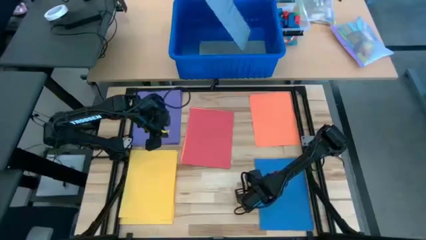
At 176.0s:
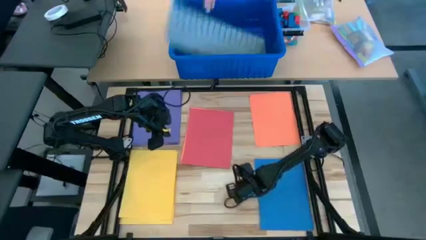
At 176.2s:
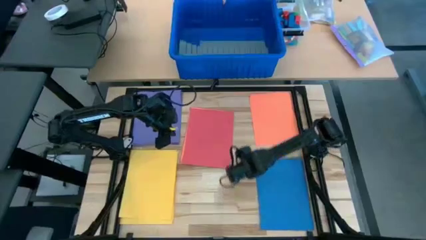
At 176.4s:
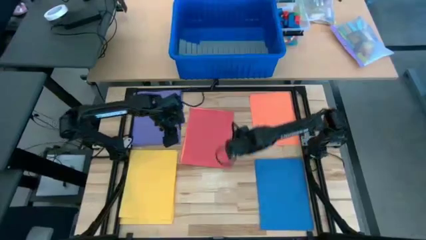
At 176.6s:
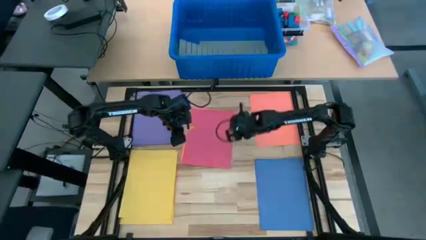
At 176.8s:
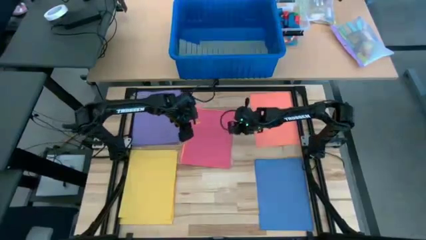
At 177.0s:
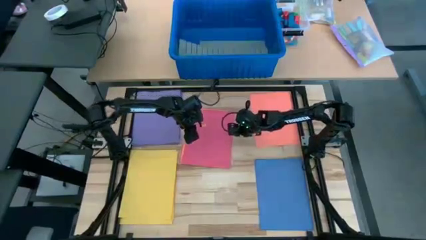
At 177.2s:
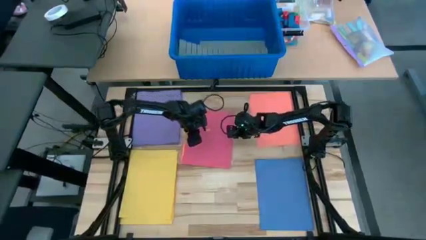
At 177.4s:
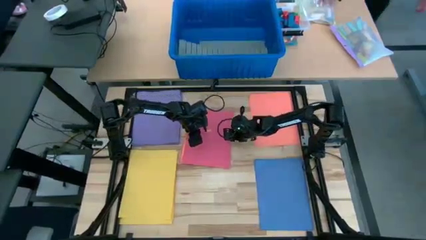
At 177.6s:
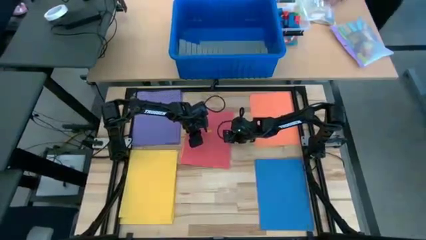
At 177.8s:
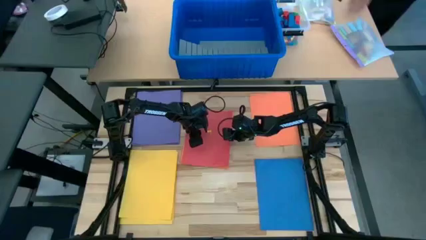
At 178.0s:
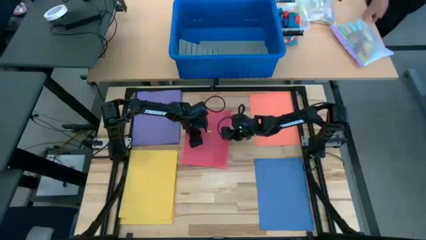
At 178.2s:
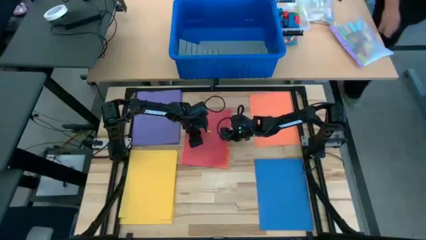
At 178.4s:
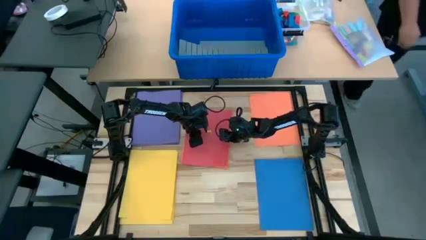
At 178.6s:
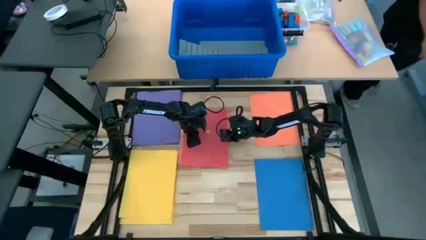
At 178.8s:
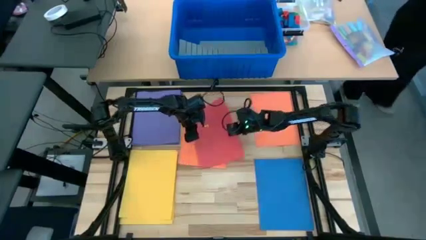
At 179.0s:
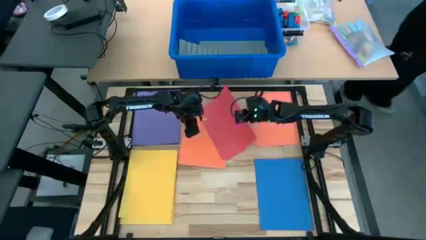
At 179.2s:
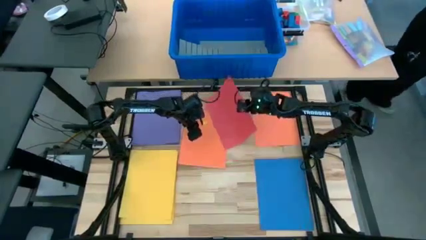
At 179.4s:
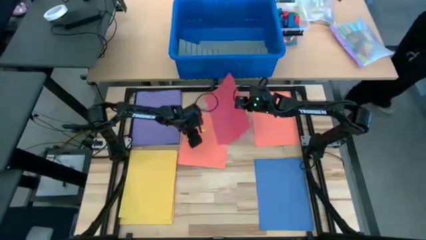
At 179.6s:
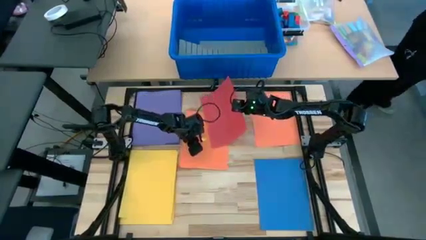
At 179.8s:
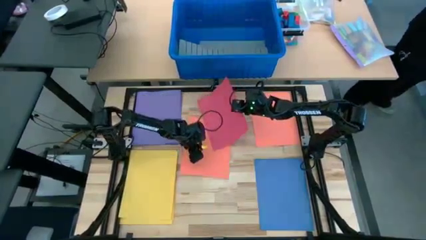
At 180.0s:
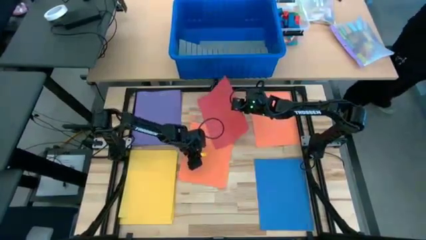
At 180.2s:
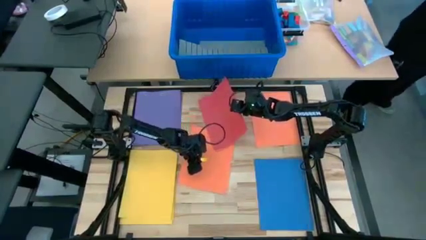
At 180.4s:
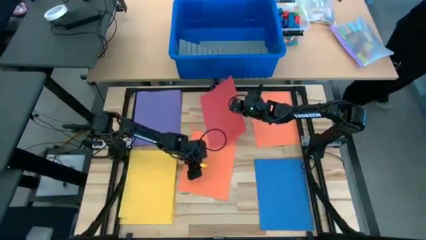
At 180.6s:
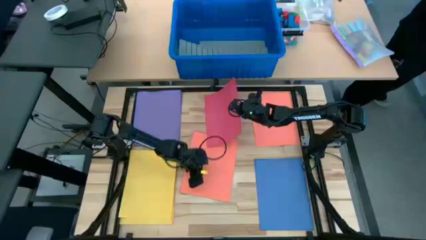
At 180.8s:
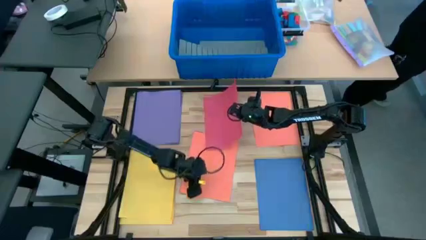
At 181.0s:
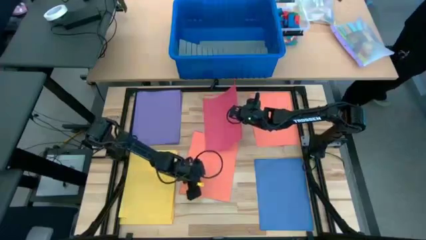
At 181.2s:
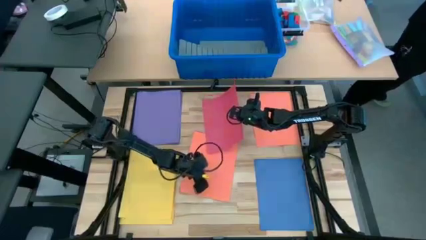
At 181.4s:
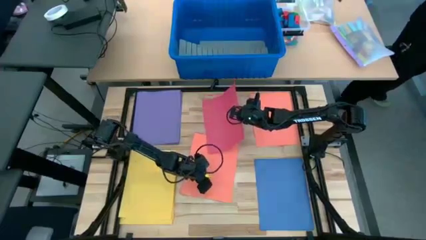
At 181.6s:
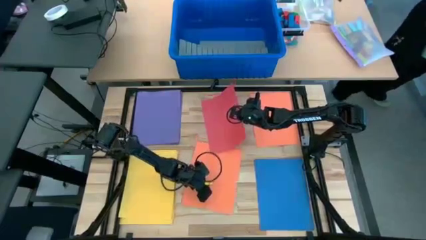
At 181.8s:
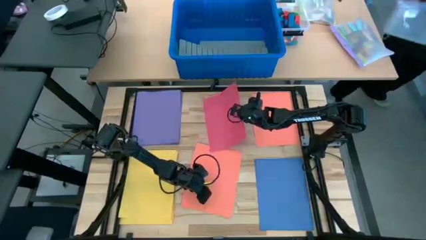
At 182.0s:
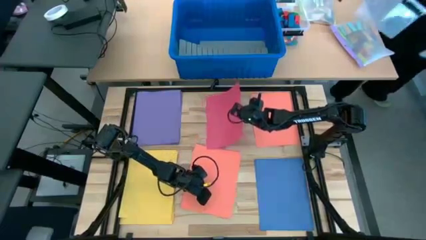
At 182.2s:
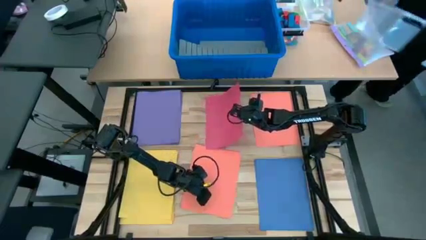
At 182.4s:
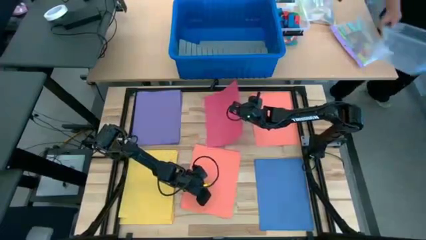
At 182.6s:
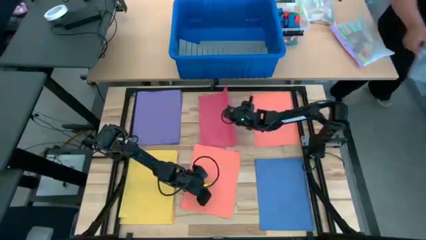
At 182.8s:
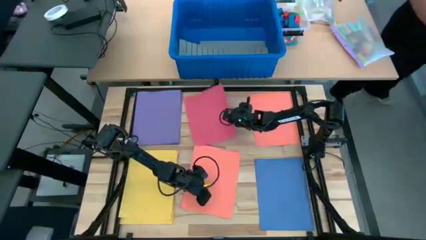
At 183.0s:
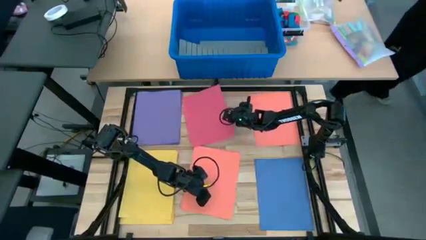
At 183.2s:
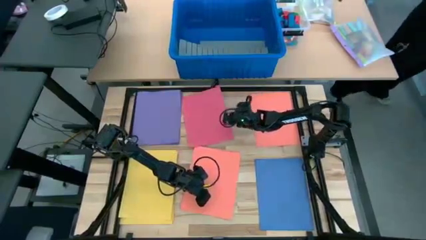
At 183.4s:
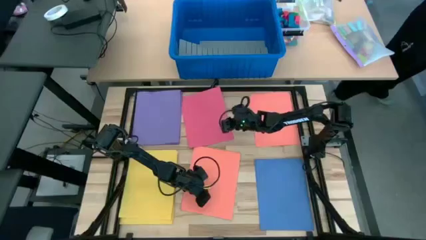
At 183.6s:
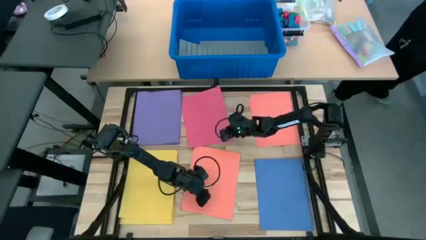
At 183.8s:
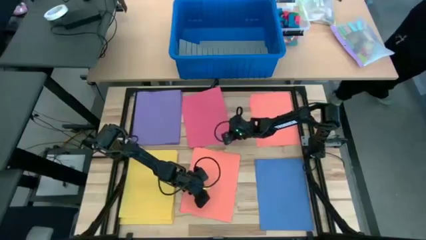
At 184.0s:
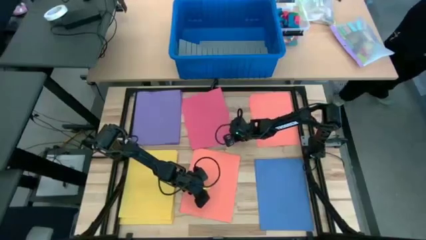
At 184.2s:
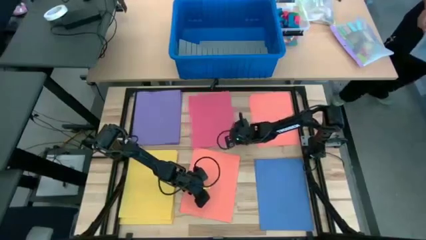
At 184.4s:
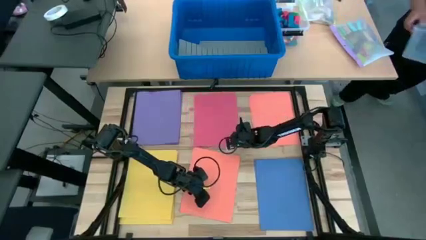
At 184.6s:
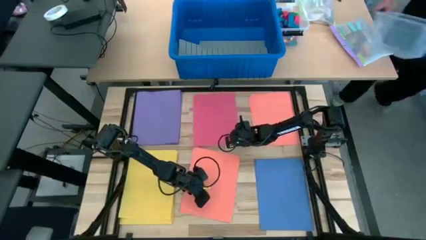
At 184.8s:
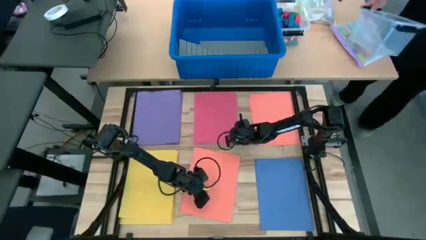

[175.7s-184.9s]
Task: Organize paper
Prepare the pink colored paper

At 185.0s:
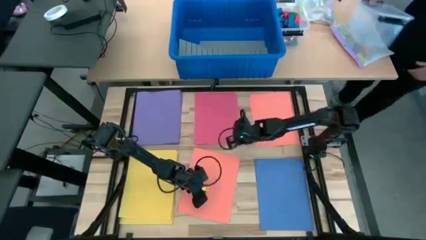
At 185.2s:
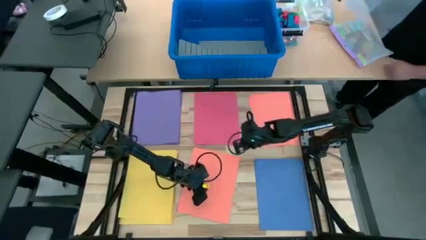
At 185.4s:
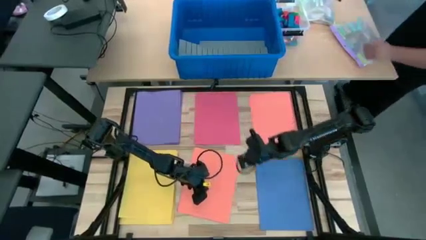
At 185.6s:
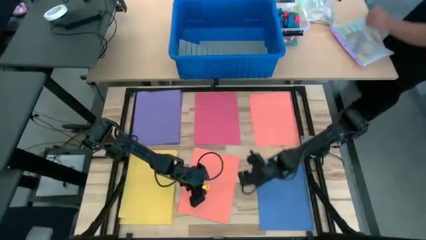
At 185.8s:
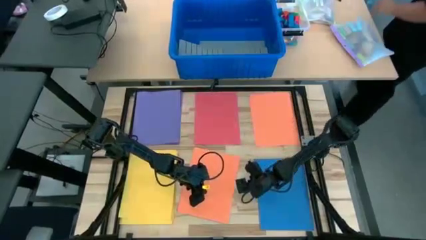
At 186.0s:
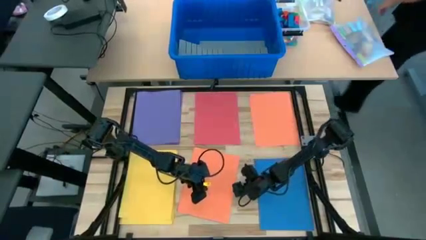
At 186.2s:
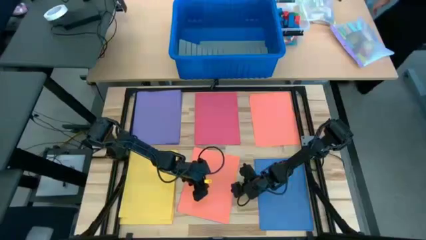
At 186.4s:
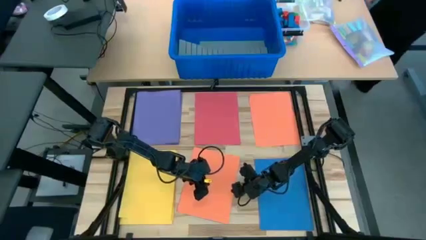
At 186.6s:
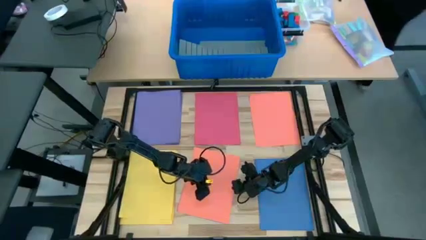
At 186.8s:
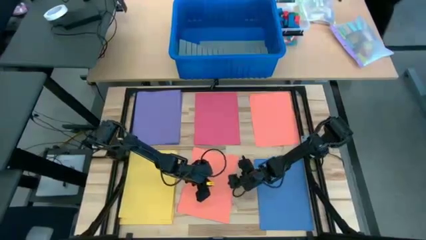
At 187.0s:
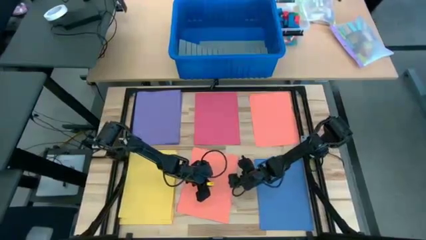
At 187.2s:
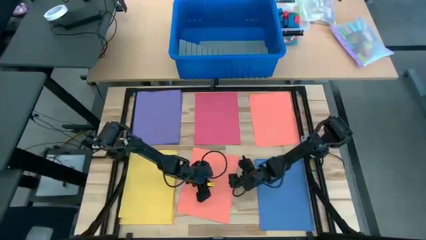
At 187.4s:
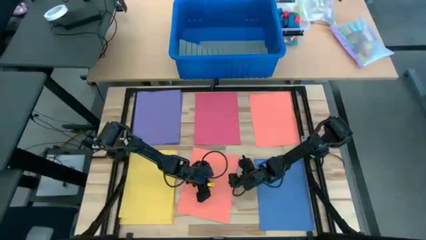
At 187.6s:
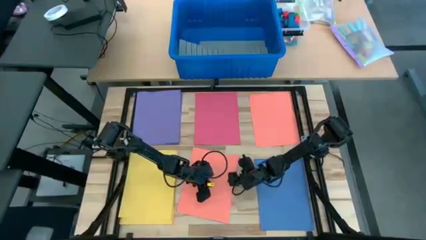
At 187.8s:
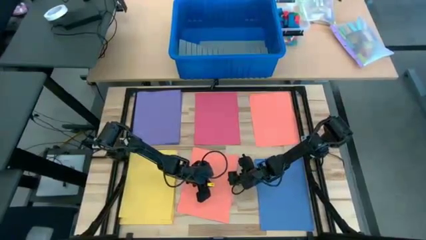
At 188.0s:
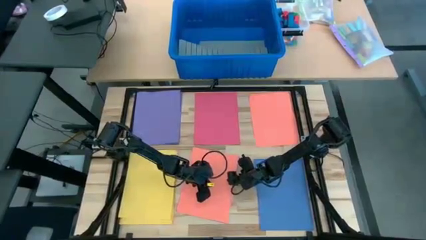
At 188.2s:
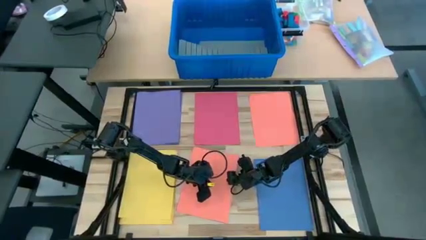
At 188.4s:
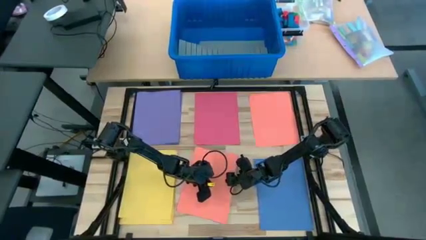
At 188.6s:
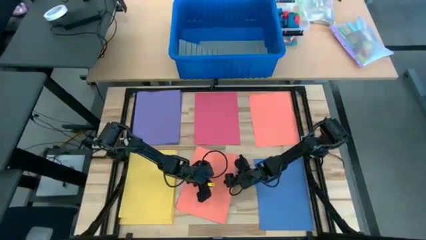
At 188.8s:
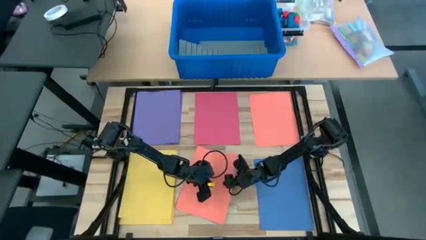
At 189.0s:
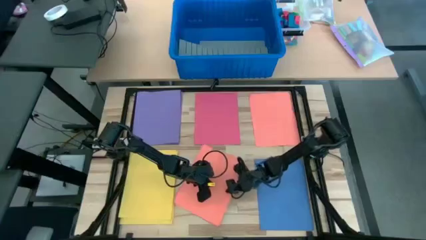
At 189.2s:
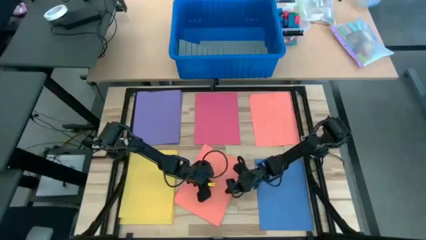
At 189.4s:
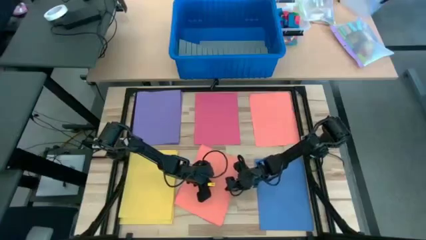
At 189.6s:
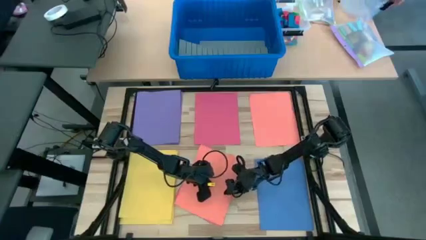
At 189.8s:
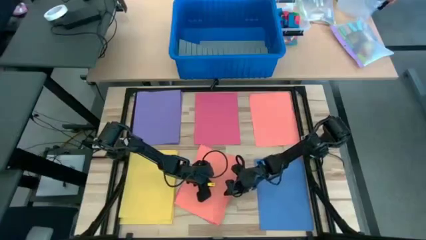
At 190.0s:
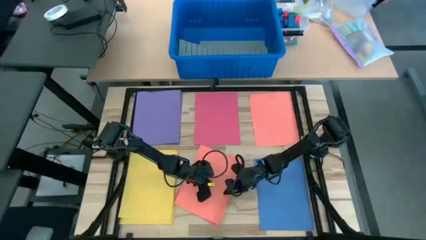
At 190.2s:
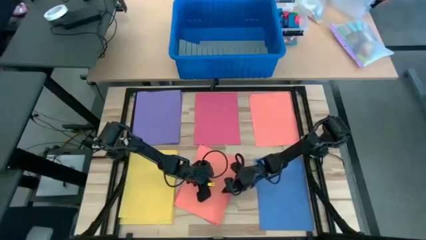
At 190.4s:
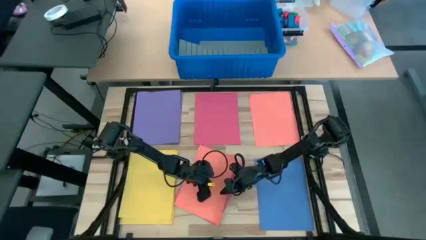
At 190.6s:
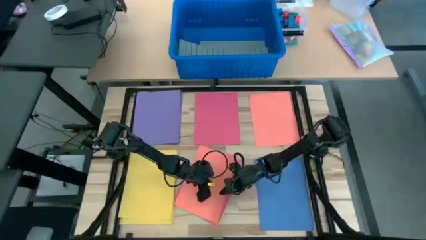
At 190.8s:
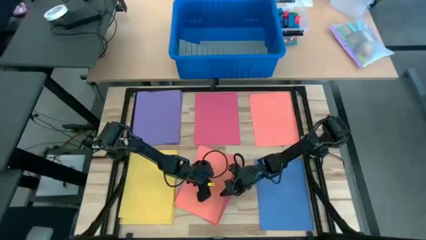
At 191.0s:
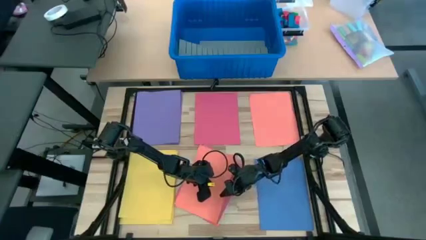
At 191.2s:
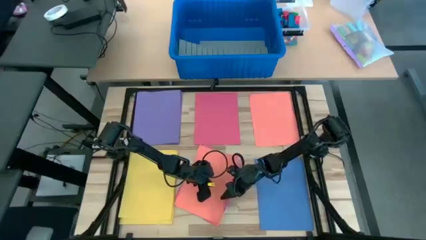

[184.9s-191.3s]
Stack the orange colored paper on top of the other orange colored paper
